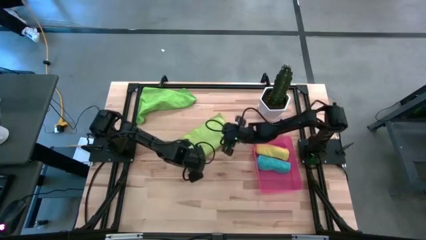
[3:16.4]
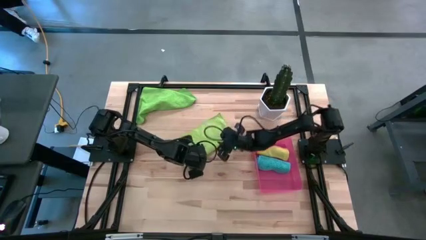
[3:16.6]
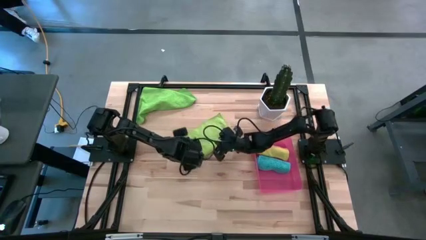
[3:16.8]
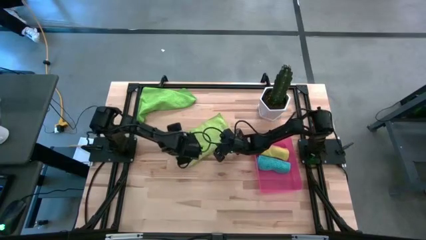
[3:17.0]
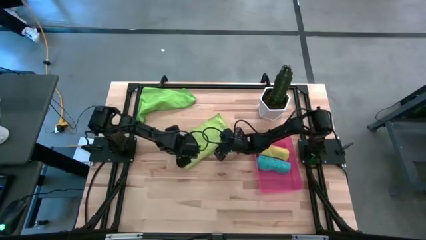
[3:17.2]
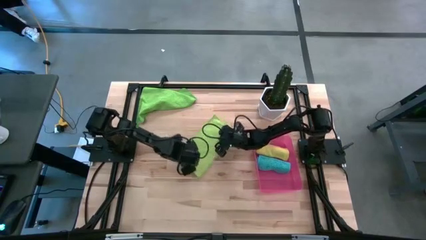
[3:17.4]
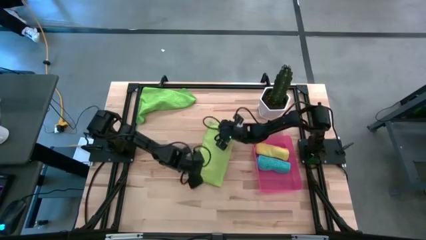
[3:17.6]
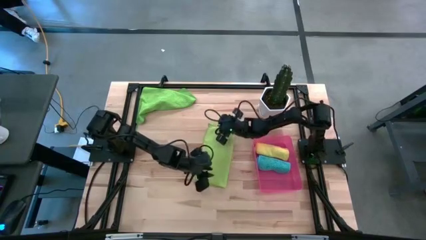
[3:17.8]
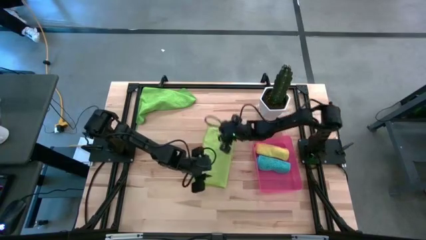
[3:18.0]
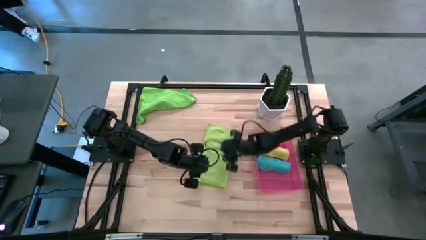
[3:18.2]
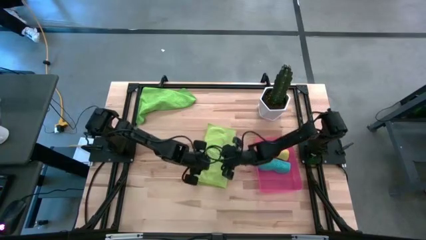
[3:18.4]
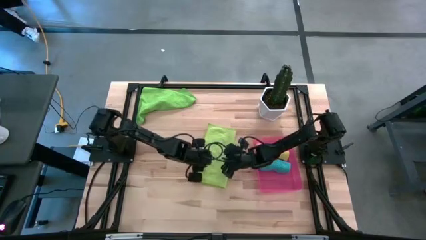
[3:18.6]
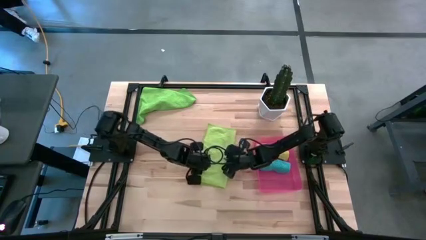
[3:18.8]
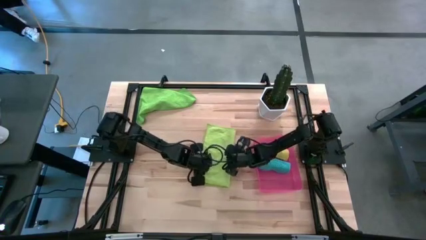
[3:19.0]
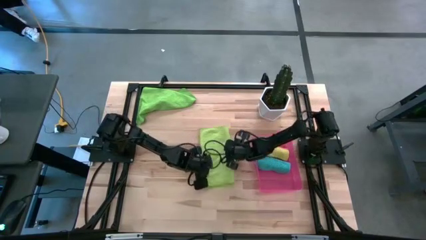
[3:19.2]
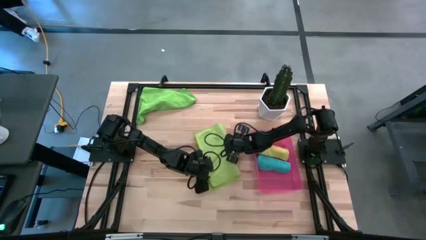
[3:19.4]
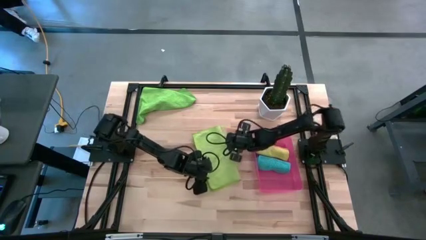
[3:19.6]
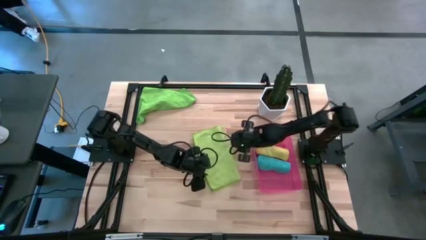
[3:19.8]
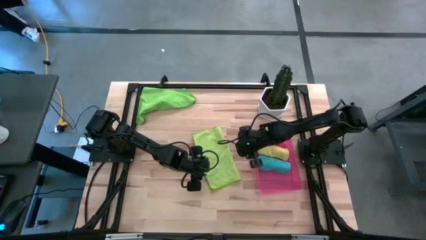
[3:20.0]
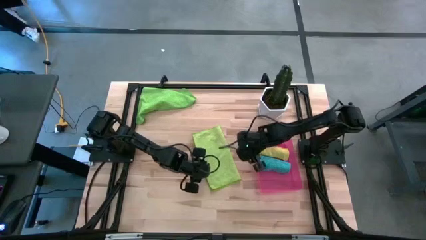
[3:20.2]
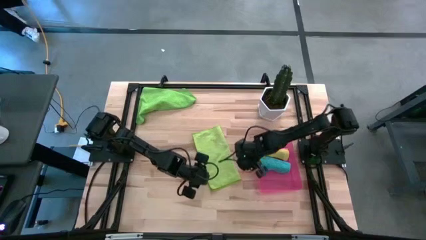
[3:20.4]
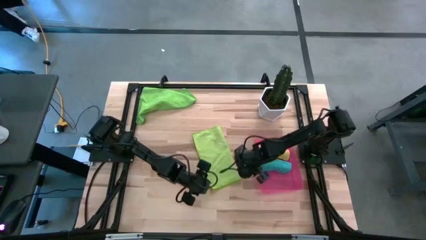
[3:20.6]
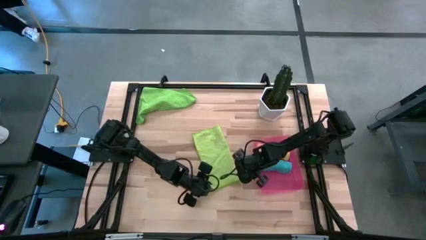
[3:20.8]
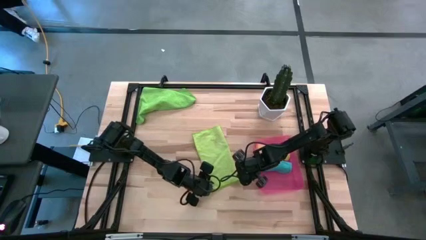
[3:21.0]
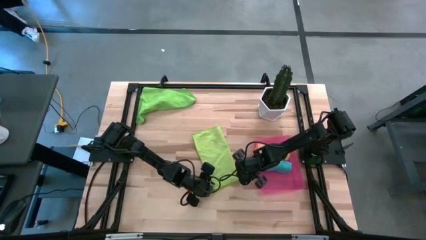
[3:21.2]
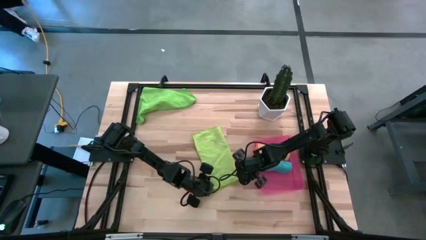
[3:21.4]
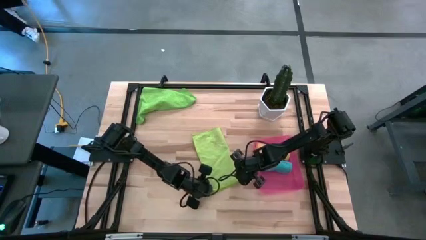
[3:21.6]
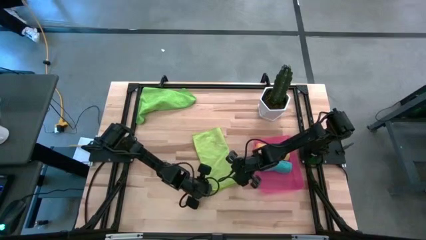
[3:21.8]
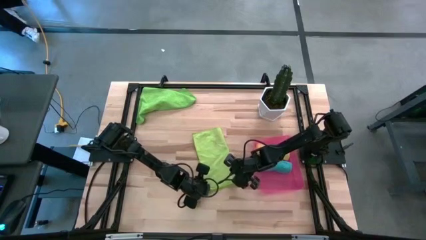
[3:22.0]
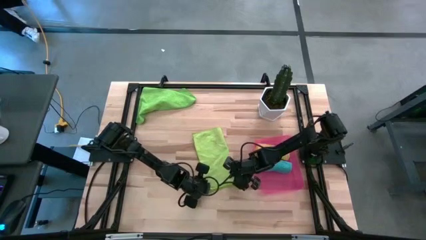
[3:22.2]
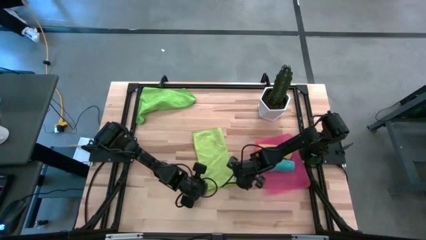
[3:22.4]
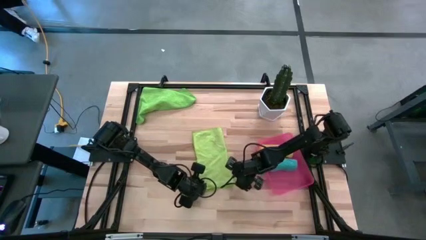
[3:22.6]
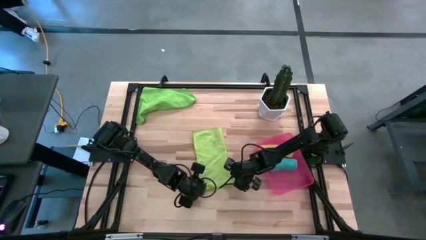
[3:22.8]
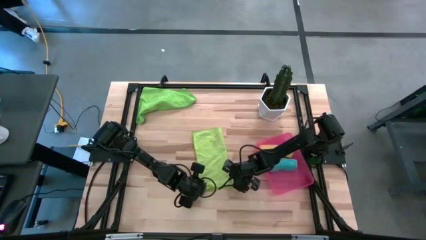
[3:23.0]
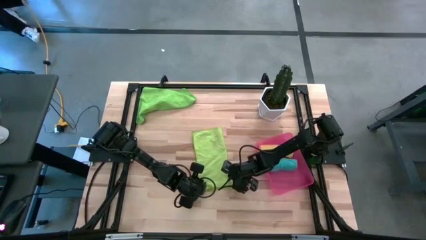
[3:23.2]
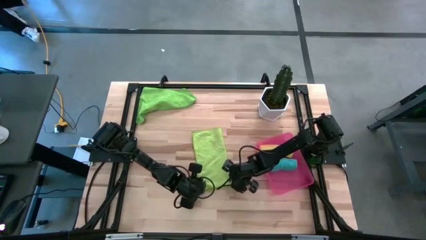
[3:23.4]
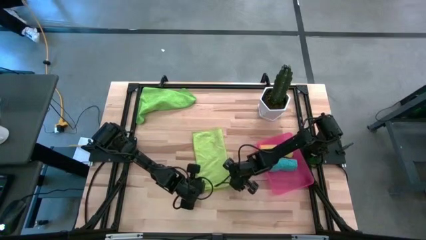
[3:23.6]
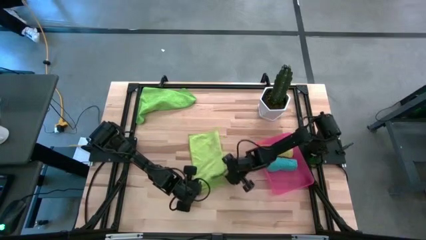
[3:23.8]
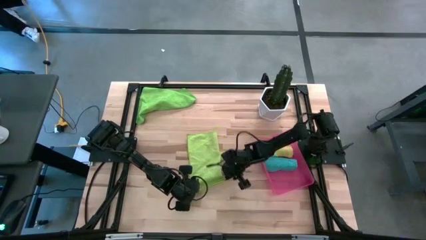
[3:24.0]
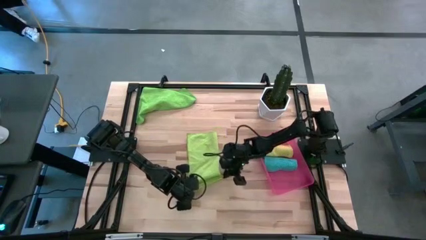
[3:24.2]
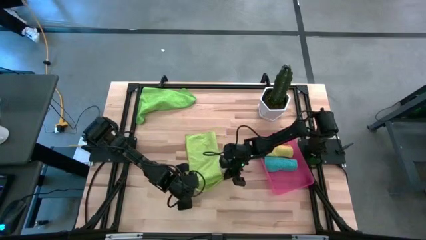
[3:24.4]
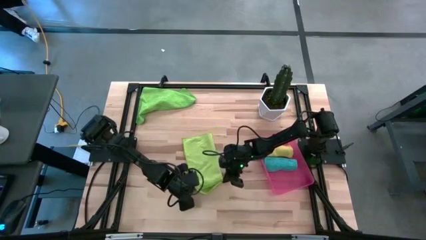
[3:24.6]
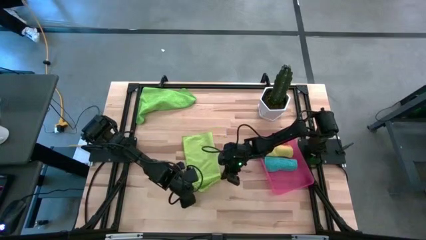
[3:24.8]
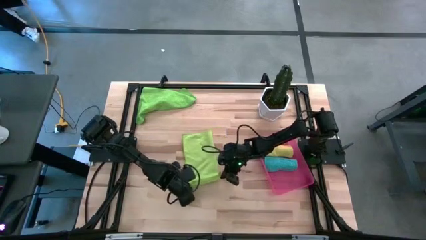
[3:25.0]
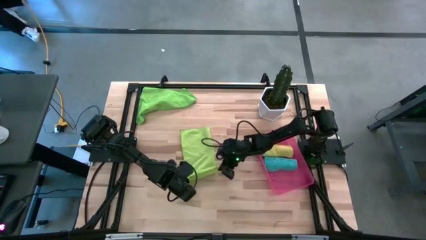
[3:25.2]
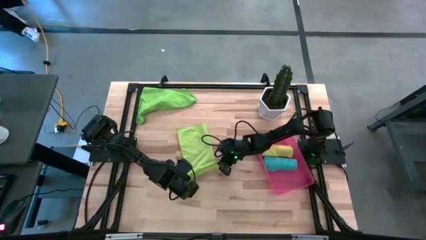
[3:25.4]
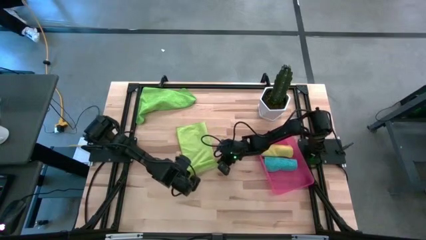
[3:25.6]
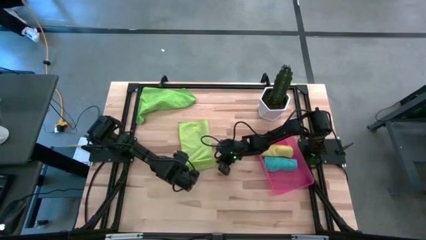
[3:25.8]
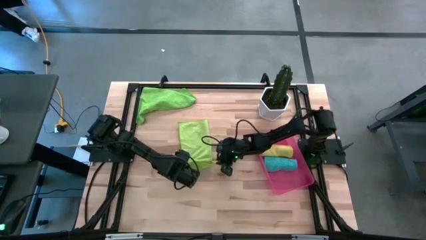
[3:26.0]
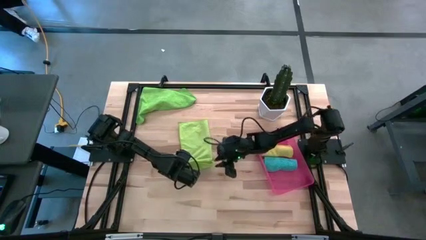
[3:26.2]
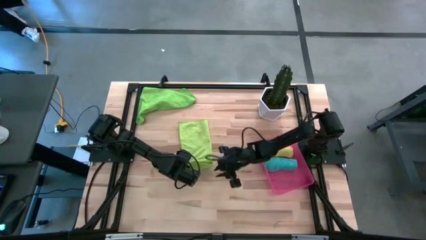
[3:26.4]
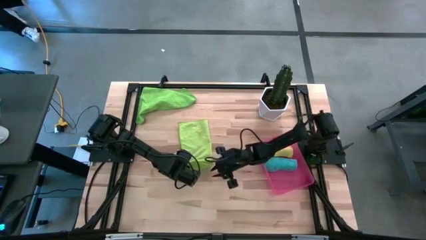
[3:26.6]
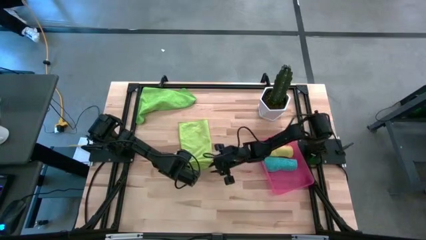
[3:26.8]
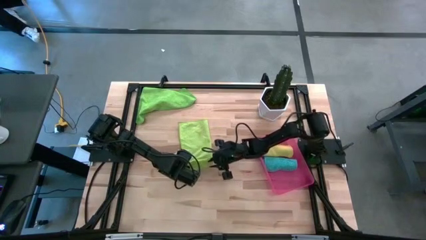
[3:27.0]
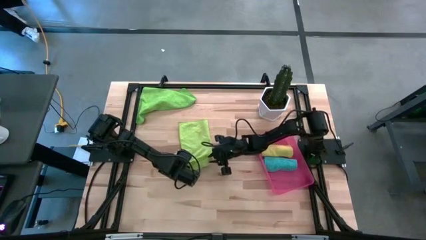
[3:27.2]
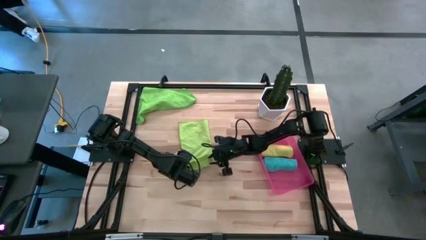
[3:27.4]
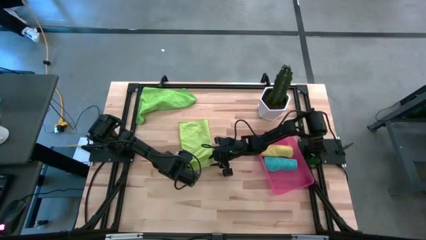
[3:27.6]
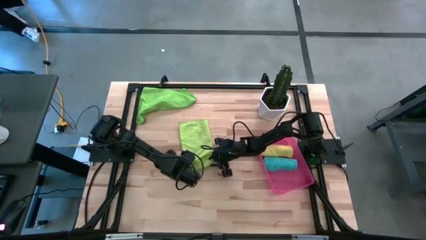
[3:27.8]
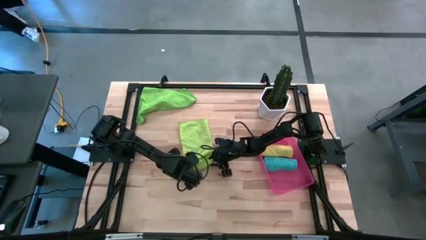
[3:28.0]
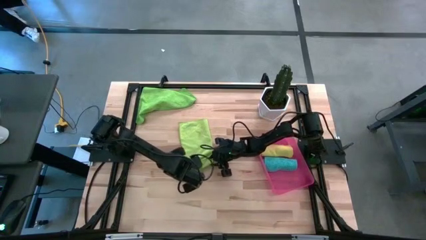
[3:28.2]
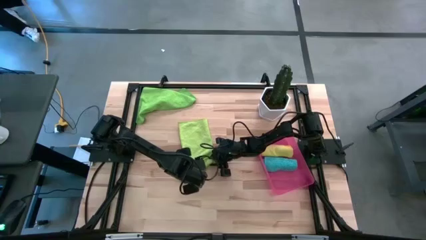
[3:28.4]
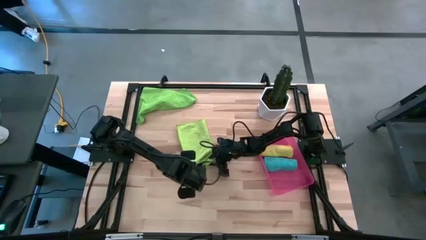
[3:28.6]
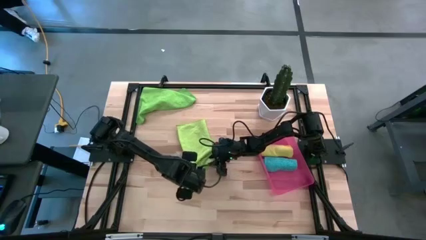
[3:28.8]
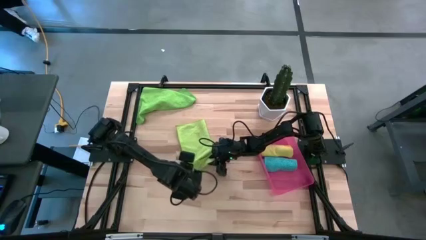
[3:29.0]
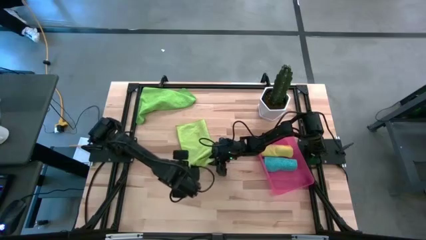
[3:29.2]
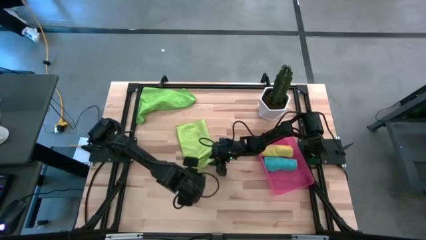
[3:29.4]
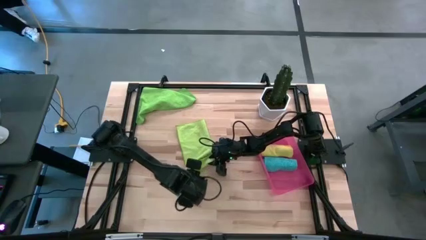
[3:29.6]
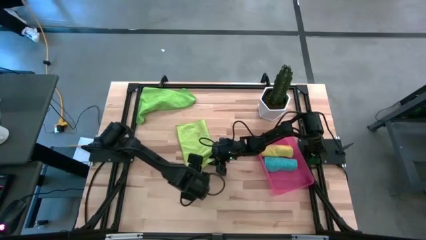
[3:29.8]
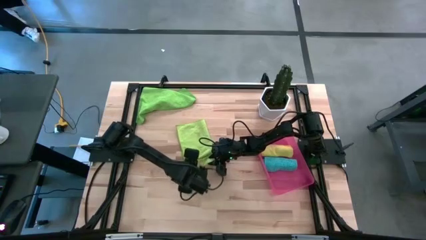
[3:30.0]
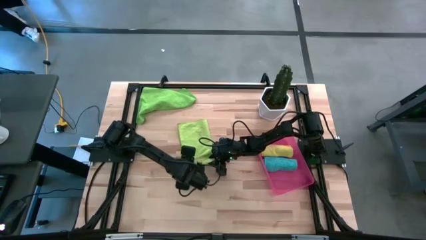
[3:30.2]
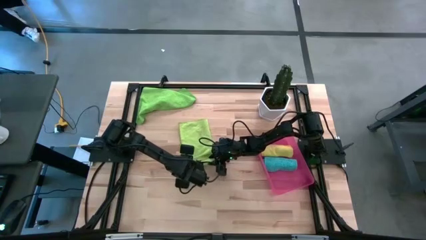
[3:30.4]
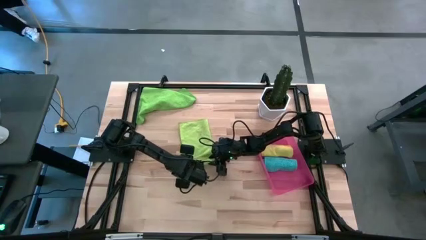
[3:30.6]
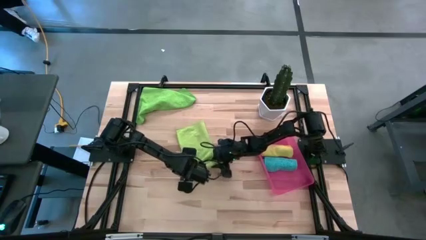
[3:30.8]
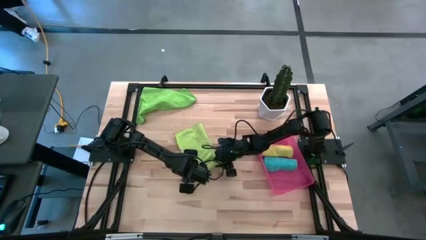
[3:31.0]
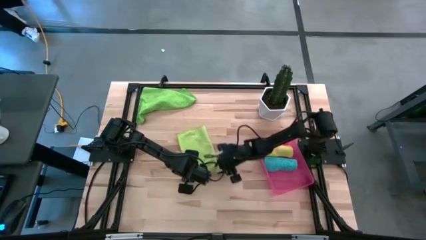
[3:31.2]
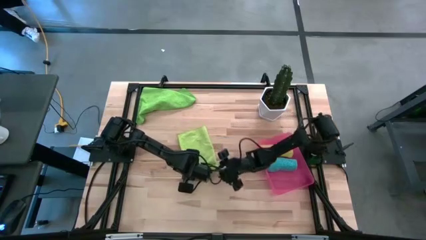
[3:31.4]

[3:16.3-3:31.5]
Task: Roll microfiber towels into tight, uniform cylinder then place into a basket
Roll the bottom light green microfiber towel
